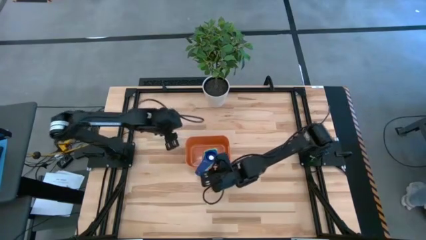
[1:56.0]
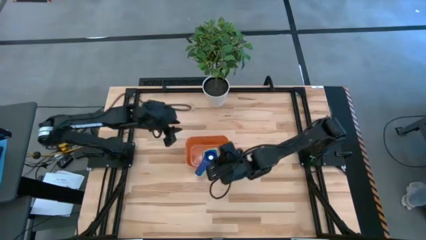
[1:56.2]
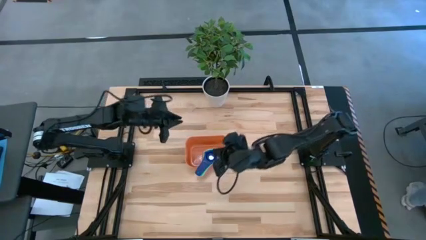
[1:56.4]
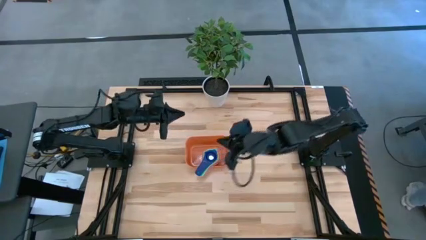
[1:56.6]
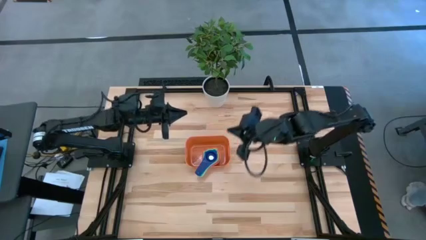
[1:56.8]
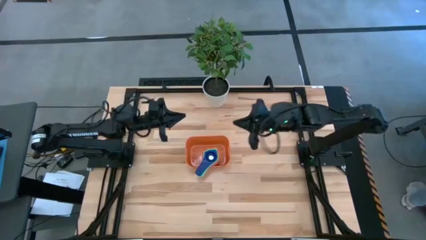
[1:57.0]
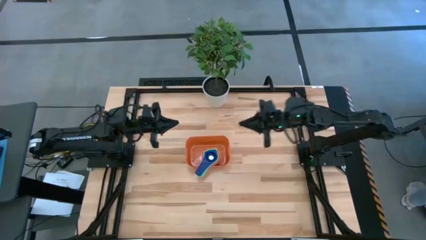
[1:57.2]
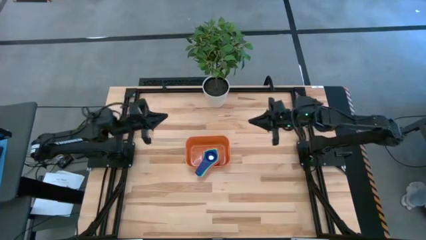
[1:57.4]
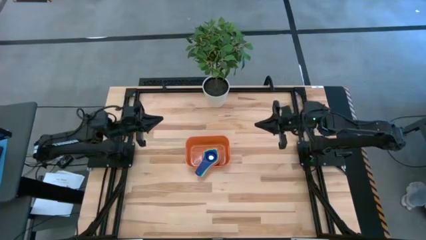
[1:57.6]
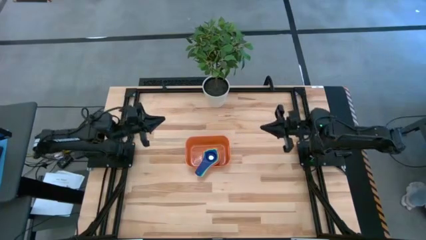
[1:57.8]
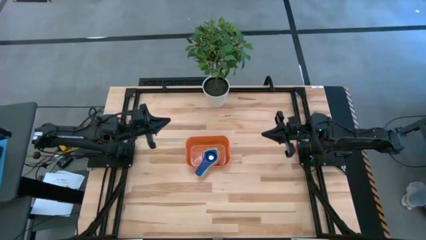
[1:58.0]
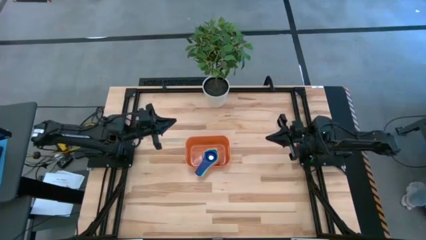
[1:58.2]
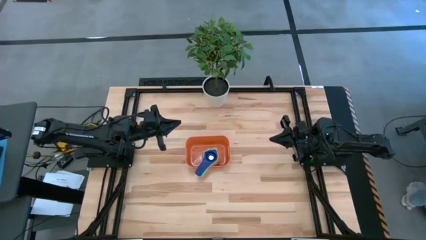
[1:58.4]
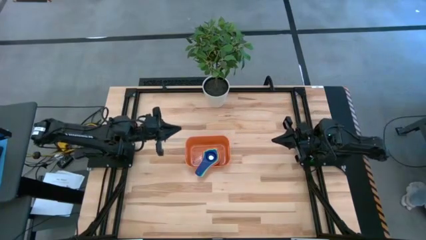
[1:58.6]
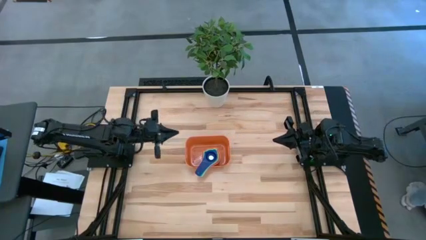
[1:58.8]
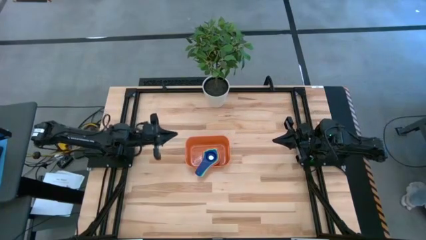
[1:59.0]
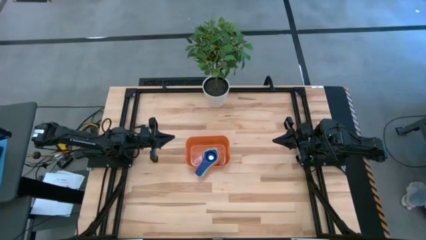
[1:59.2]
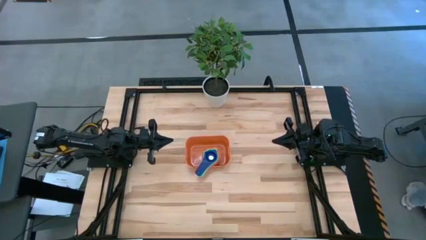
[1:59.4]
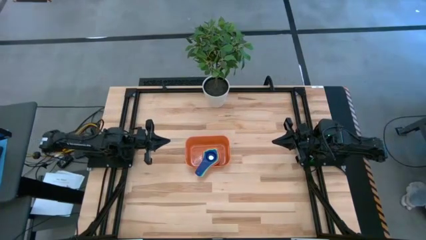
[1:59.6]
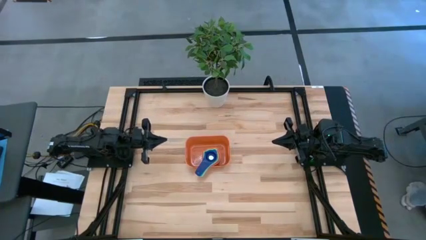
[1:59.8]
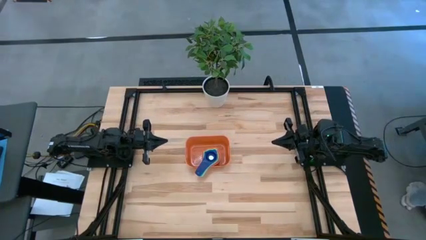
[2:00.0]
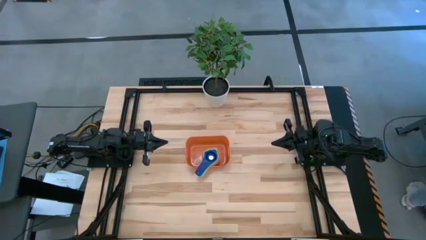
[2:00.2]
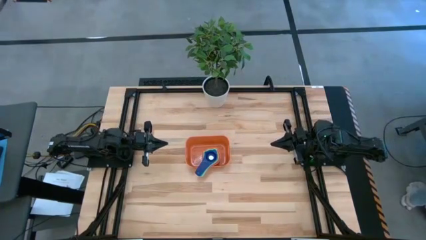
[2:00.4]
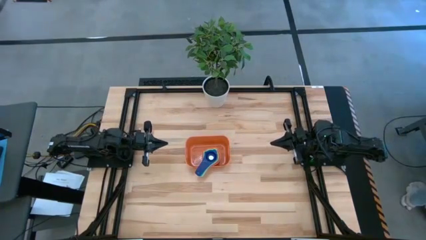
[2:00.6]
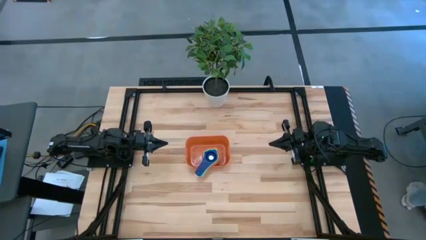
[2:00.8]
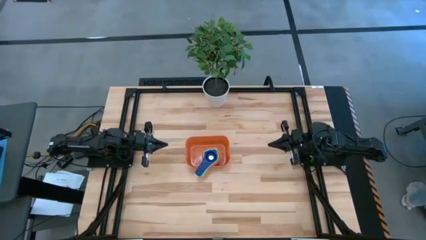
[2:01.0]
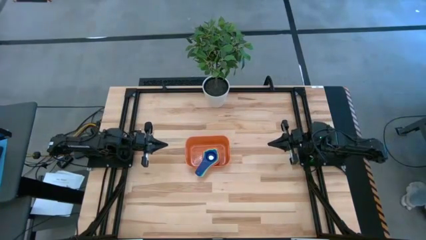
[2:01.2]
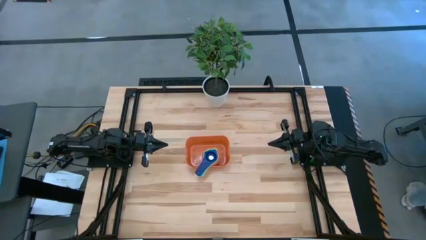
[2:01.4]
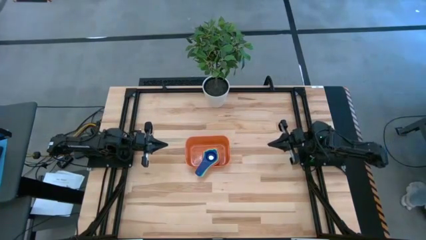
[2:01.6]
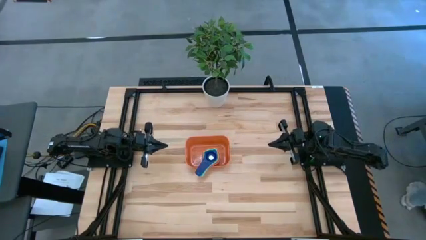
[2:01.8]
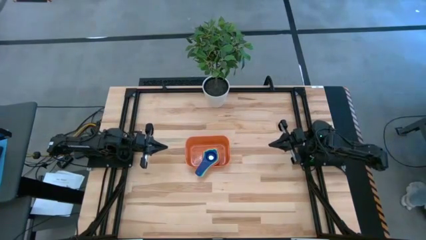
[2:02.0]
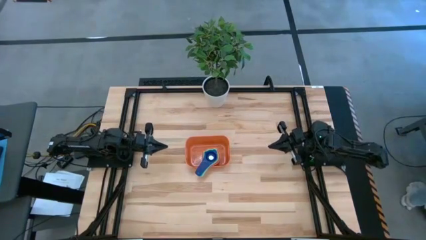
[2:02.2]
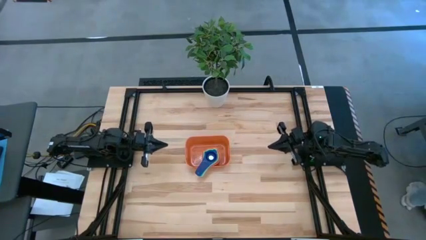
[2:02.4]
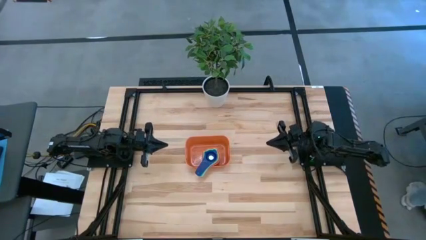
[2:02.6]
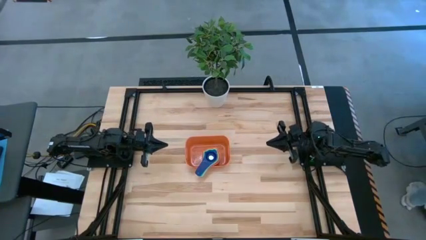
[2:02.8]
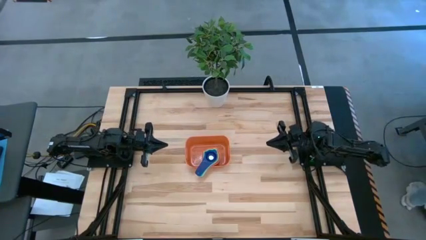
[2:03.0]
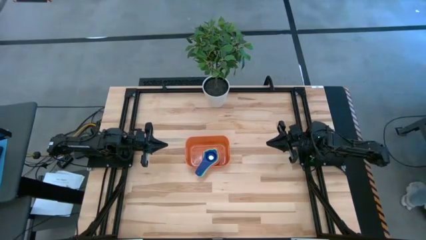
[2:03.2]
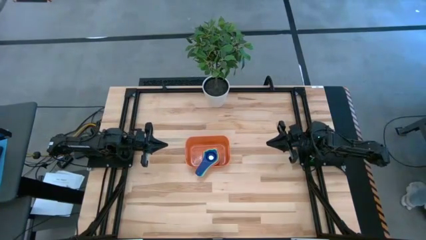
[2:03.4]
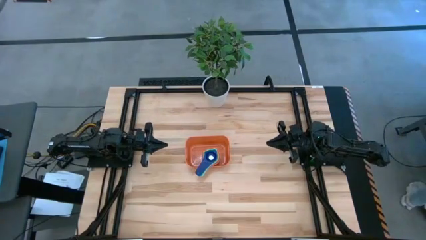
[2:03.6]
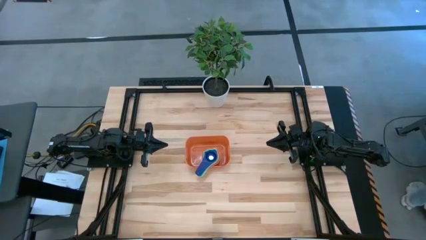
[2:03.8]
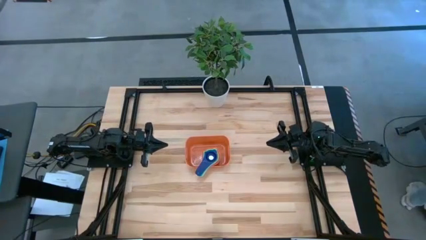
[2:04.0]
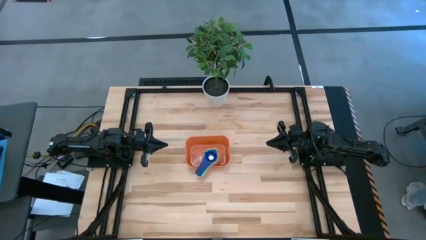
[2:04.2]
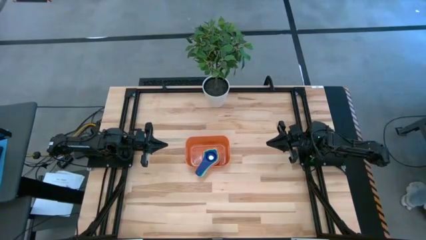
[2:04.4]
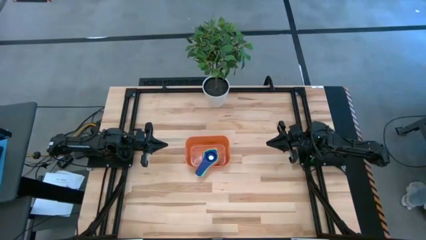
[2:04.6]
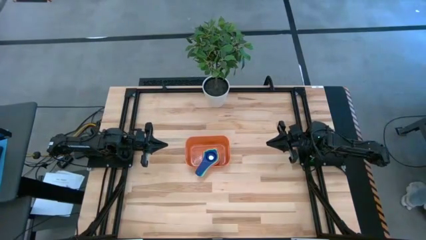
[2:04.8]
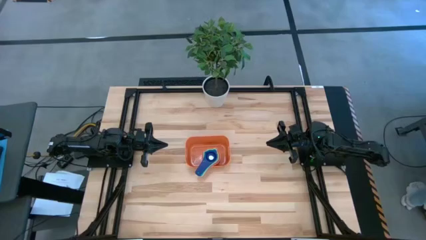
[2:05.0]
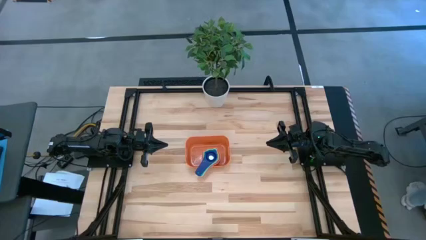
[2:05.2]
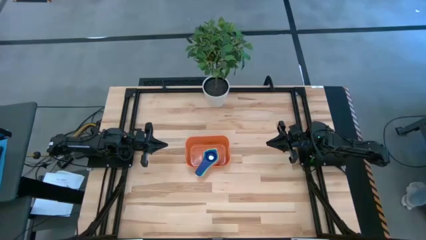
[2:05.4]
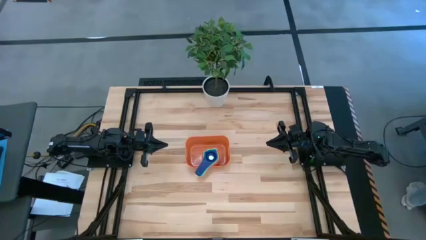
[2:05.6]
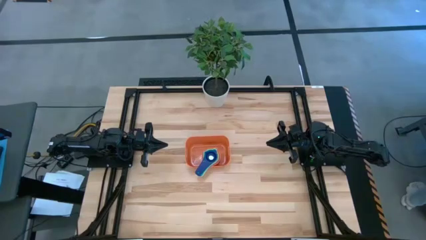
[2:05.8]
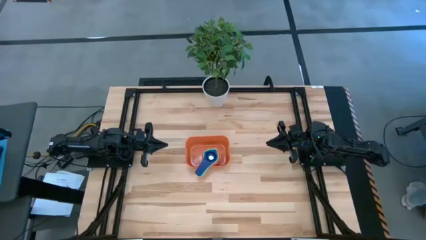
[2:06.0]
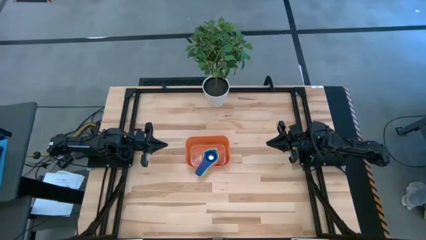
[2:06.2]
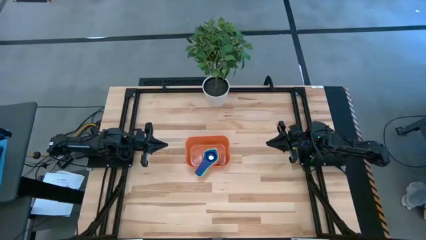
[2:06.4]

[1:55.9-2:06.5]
Task: Nest measuring cups in basket
Return to Home Position
